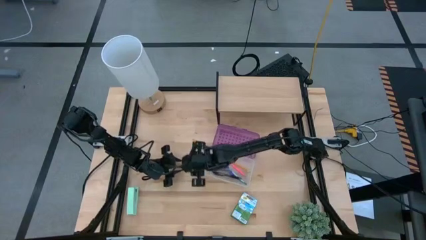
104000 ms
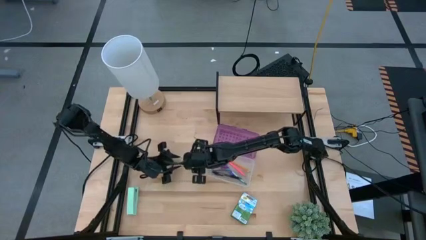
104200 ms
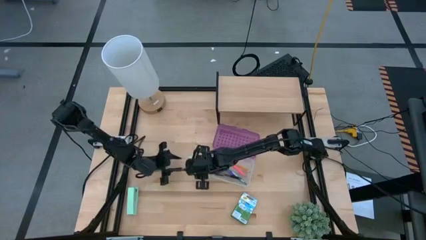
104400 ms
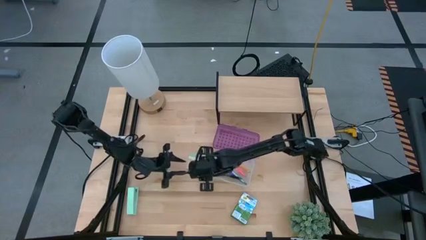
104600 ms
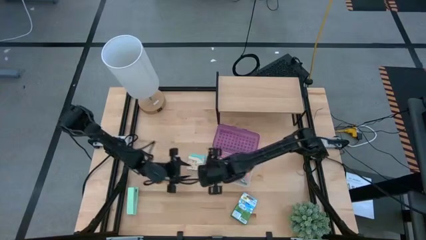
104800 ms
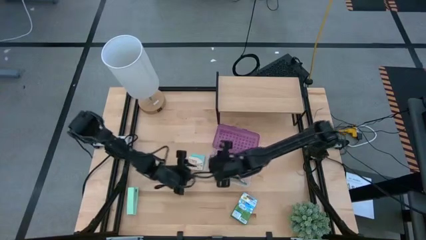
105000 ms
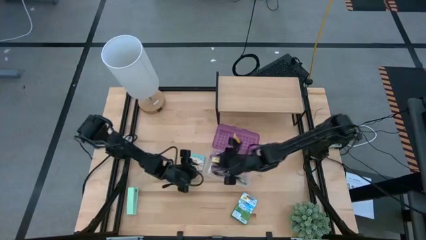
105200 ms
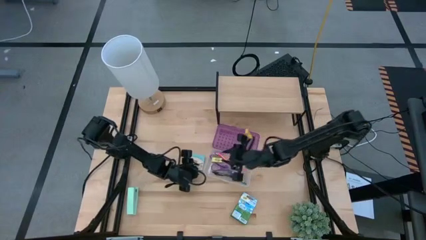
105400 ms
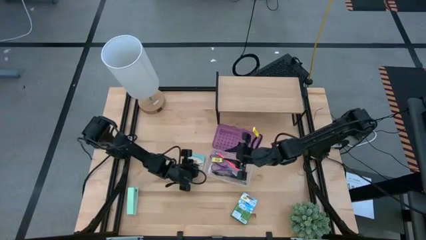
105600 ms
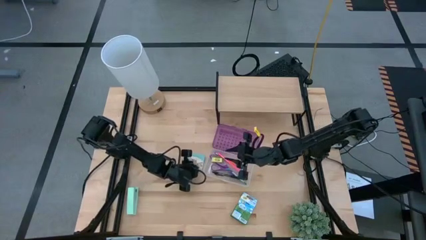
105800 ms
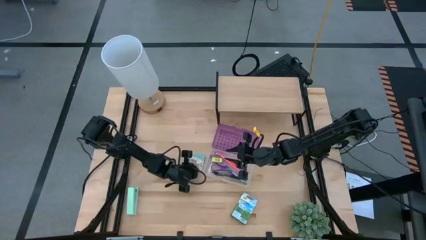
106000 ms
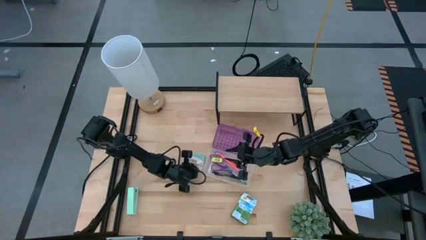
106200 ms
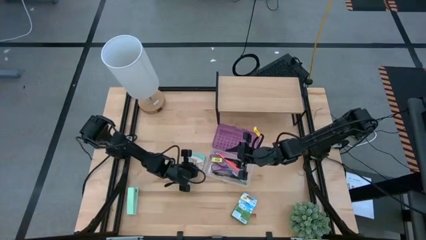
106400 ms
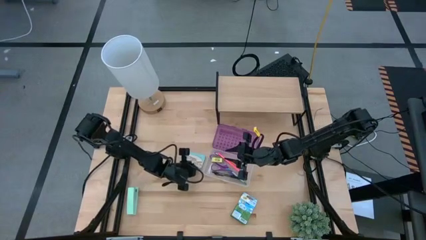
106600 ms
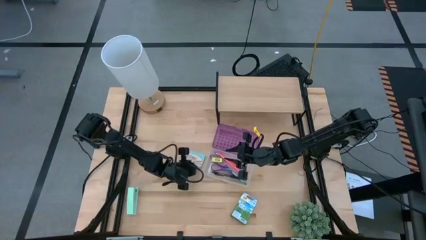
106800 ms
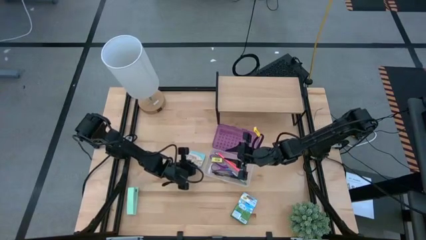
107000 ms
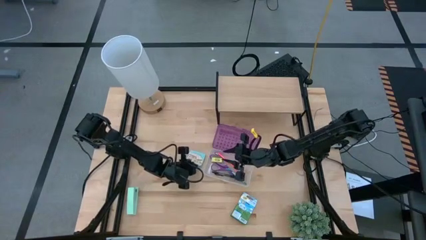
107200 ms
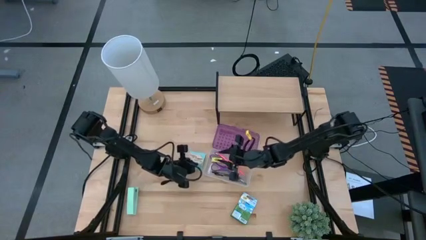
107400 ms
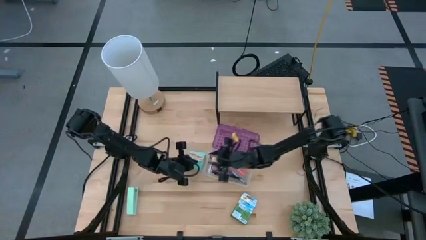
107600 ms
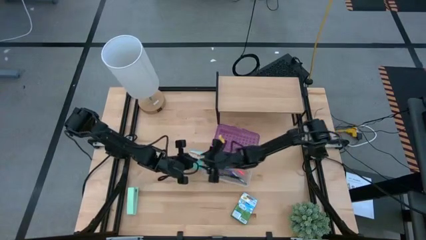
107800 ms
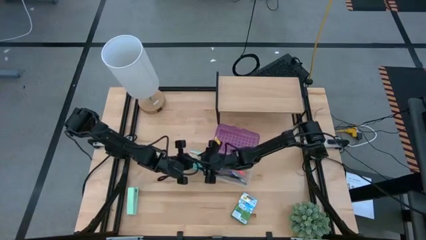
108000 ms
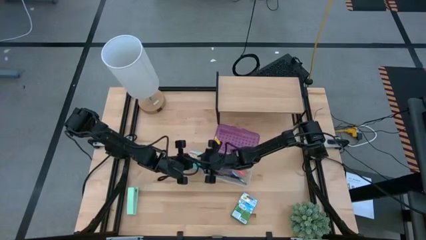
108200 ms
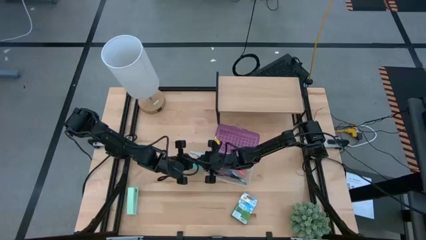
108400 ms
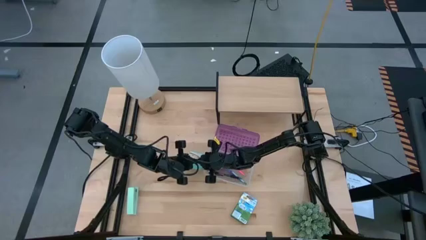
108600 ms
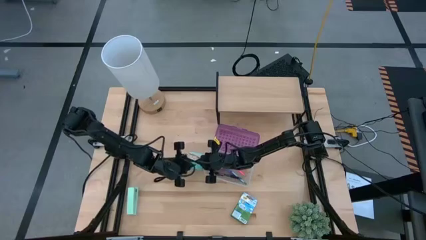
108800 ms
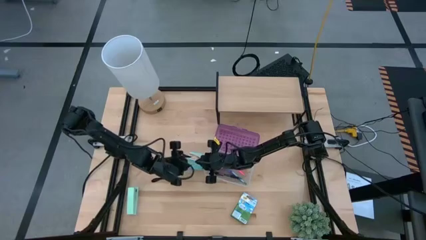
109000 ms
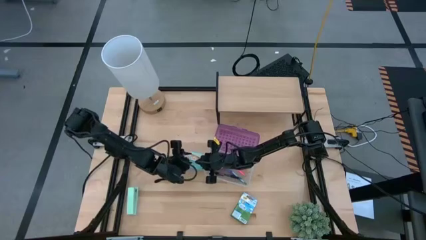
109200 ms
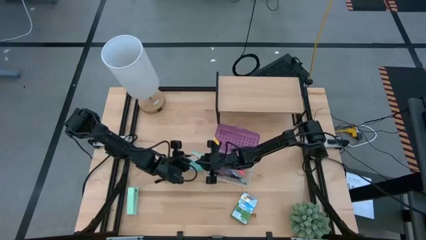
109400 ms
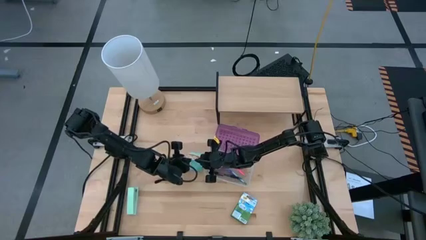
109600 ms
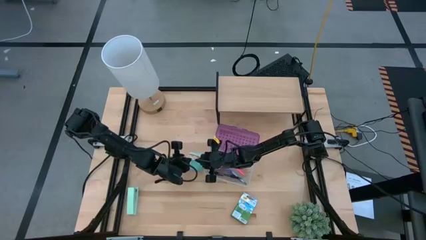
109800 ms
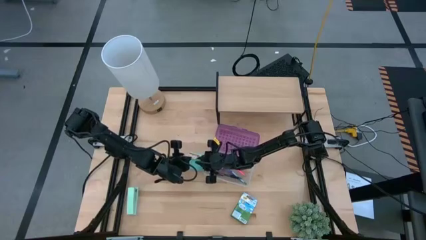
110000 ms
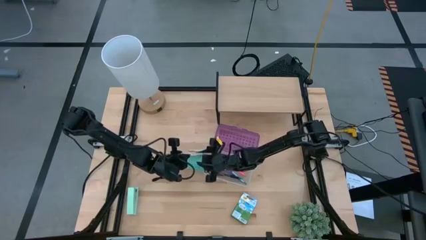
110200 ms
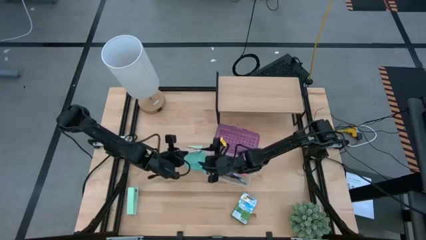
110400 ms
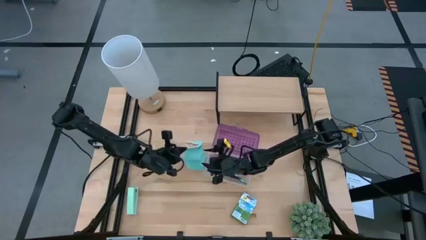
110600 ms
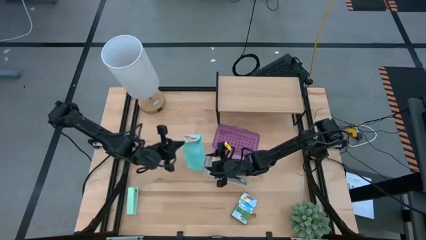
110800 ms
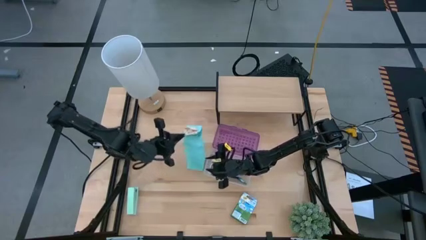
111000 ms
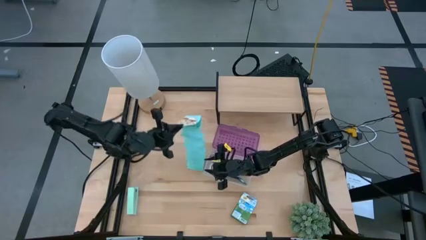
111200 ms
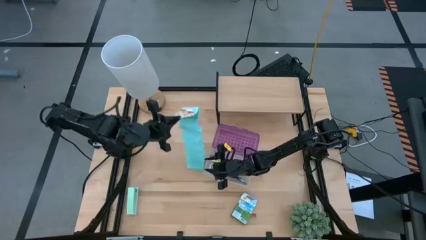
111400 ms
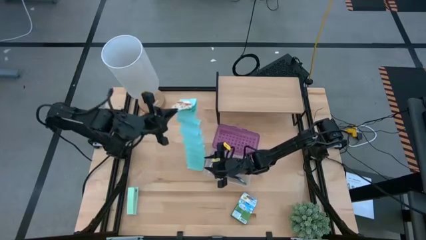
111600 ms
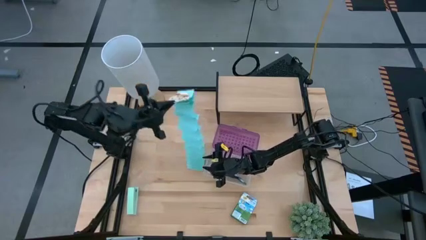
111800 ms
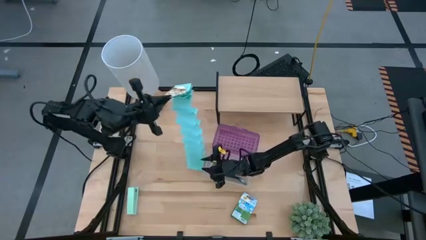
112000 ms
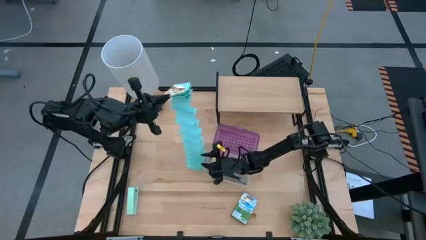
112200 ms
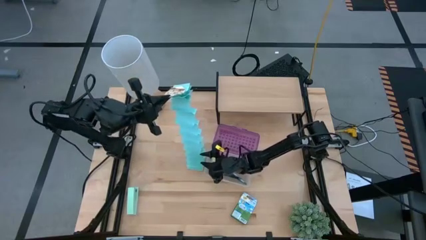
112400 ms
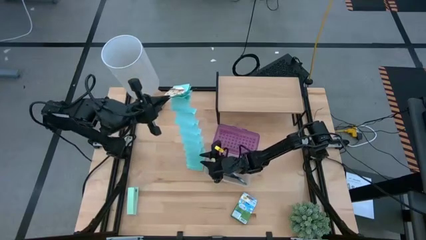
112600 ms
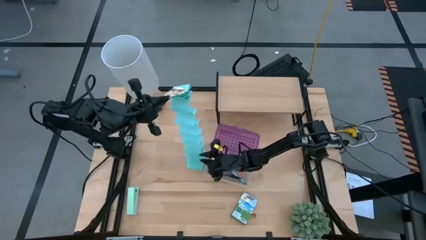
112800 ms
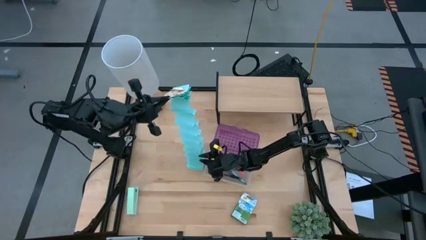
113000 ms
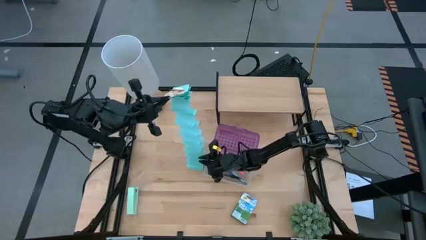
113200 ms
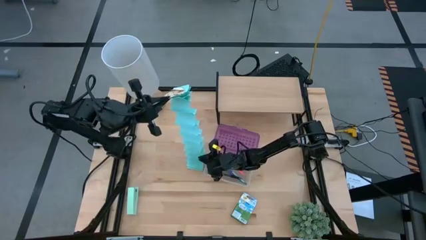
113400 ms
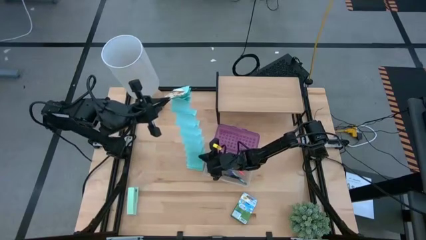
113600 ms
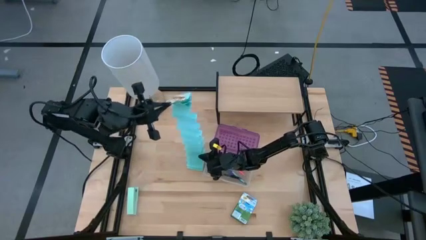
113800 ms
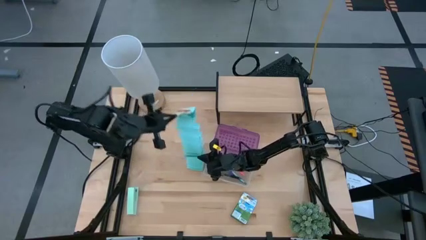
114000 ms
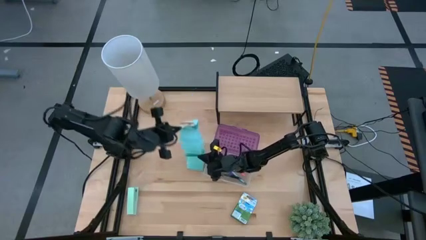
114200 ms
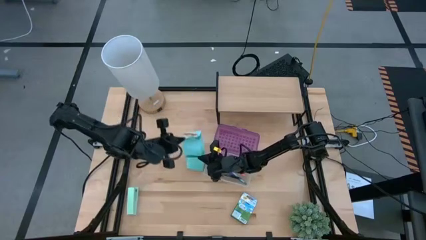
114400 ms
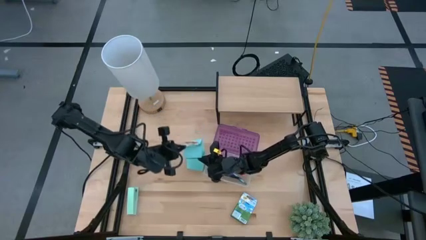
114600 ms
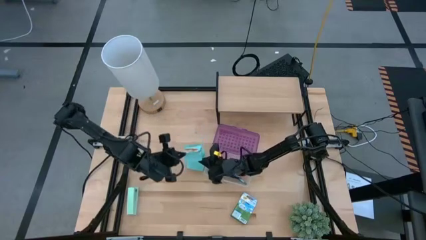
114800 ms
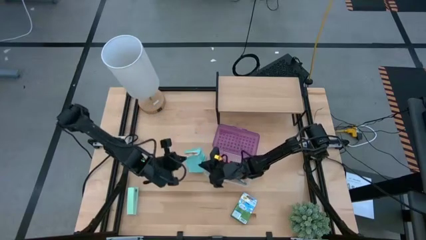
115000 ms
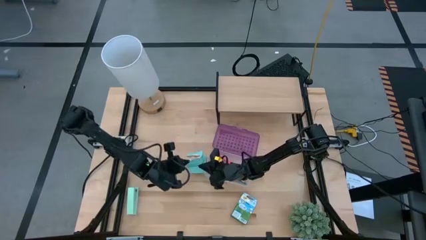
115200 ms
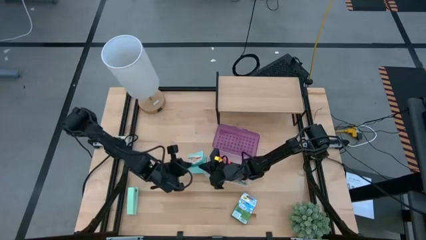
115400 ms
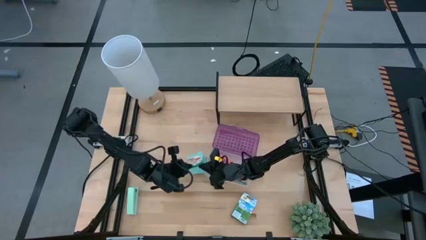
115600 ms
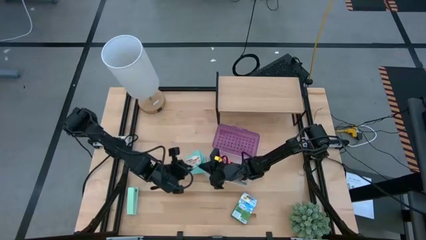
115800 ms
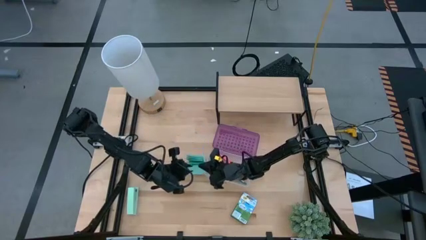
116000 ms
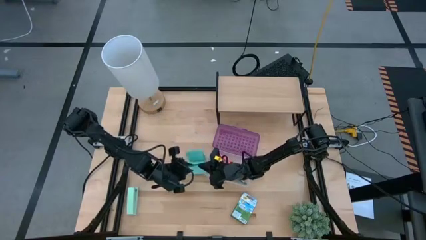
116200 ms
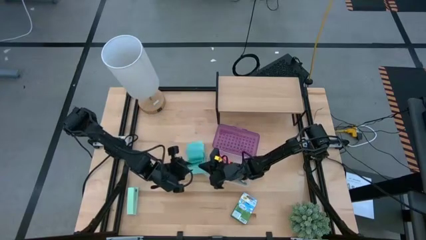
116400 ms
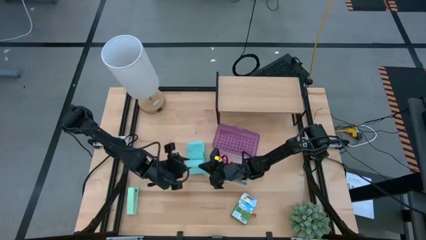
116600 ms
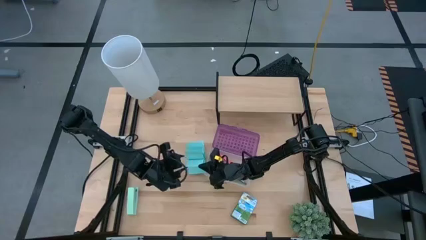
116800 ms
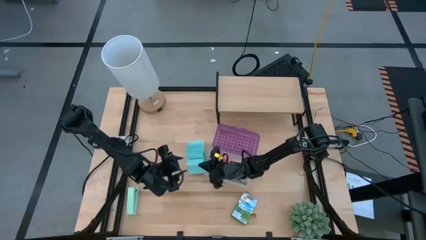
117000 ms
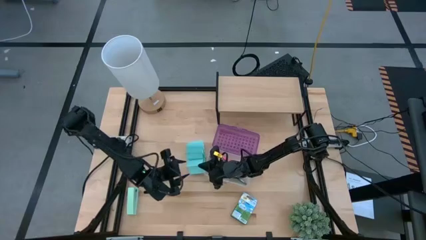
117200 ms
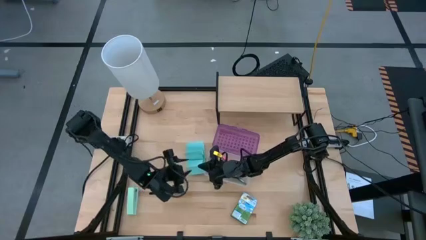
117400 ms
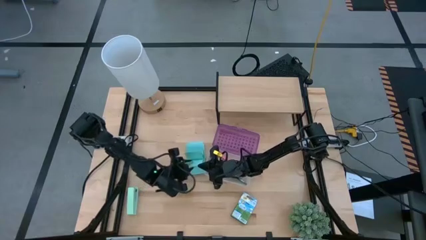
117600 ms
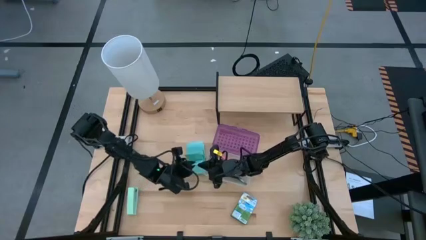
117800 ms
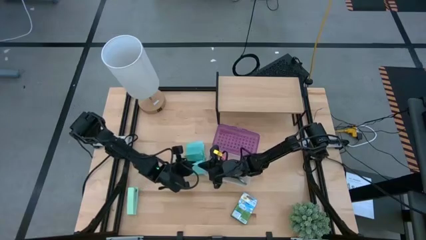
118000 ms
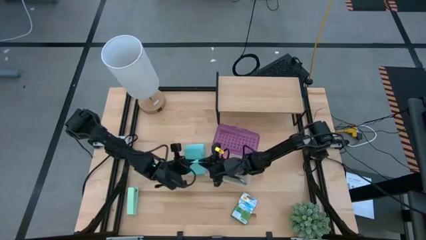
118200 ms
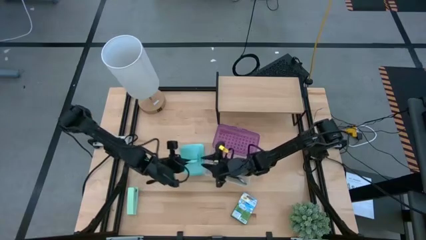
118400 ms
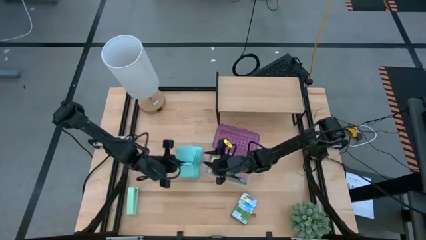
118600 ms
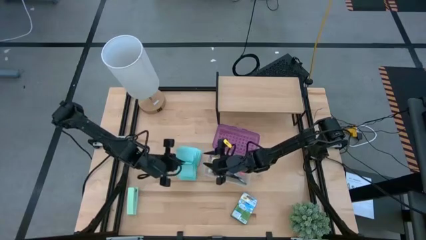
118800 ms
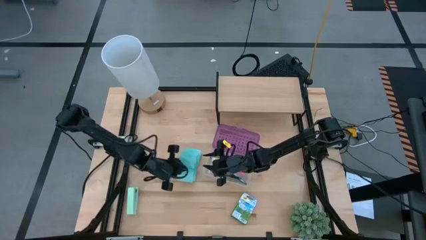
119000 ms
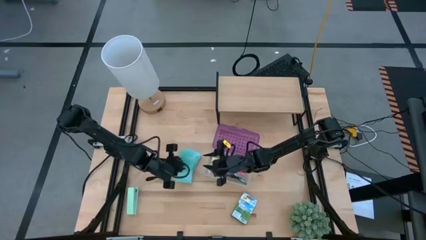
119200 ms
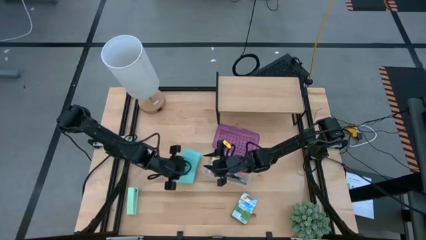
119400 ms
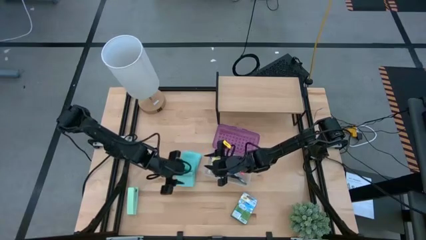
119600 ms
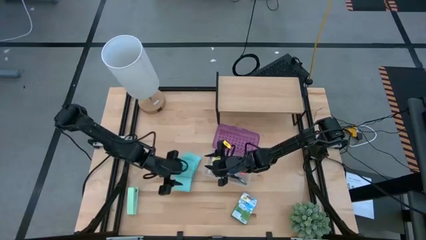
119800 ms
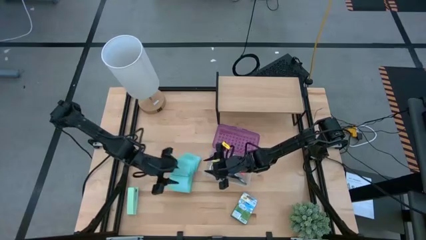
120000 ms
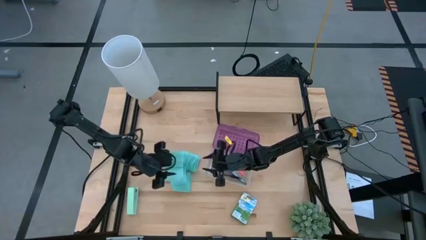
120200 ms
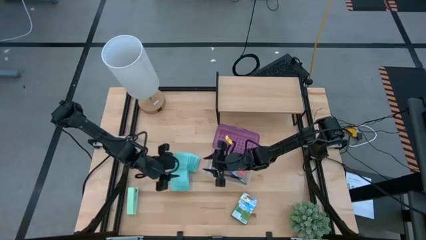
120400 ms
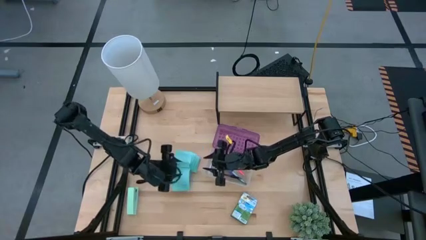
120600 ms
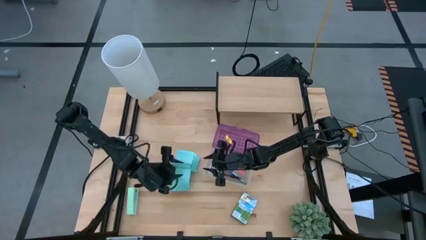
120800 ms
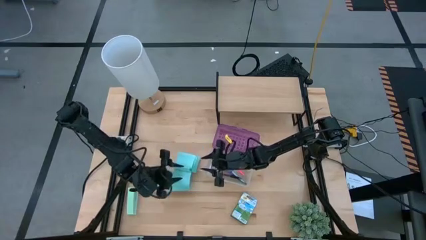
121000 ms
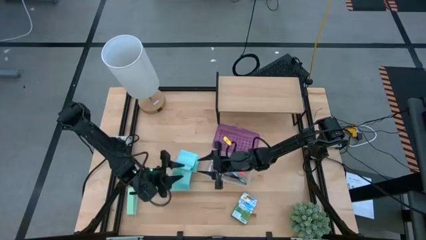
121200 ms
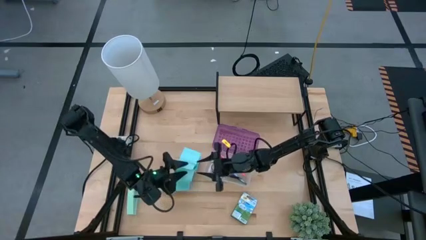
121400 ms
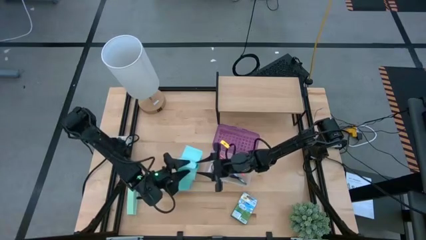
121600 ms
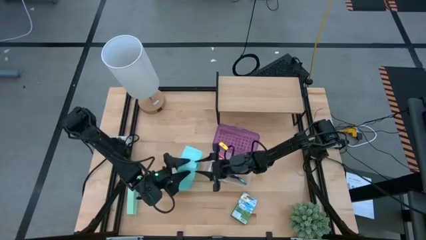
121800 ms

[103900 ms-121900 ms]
Task: Pack school essentials
Put the blue sticky notes into the purple supply box
